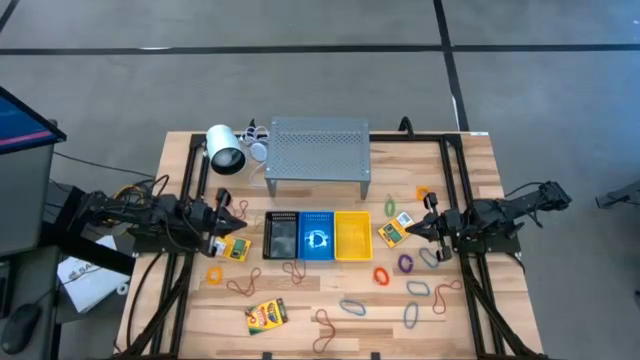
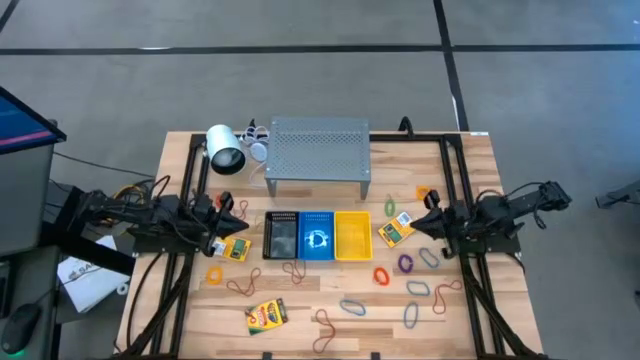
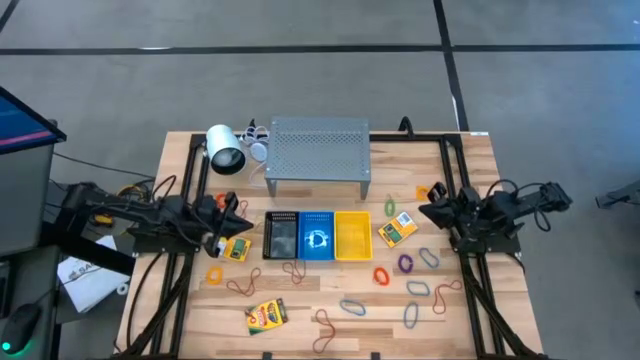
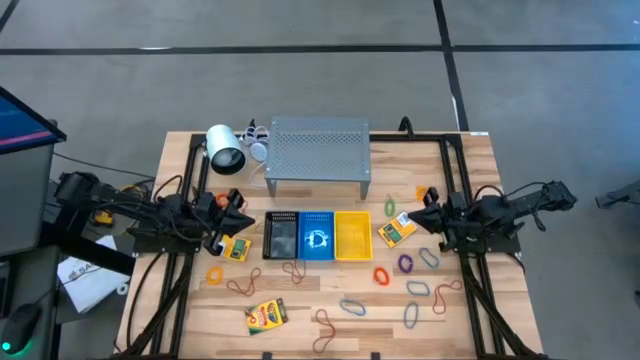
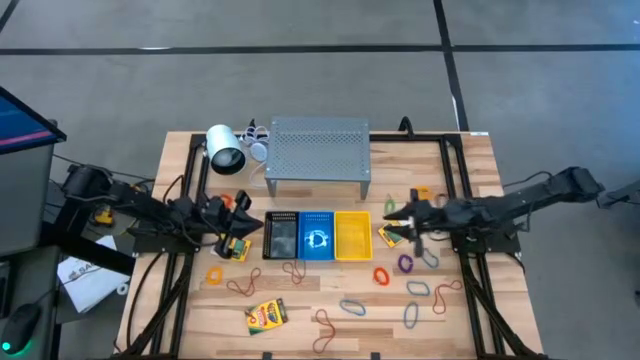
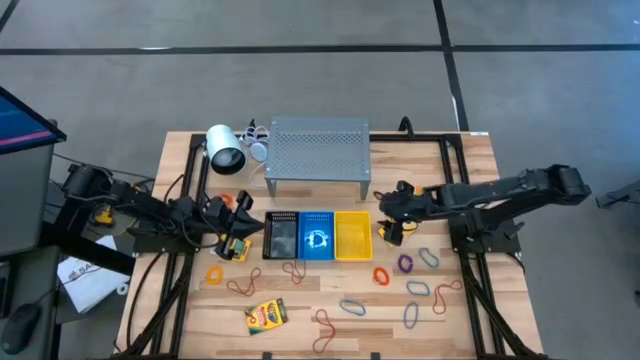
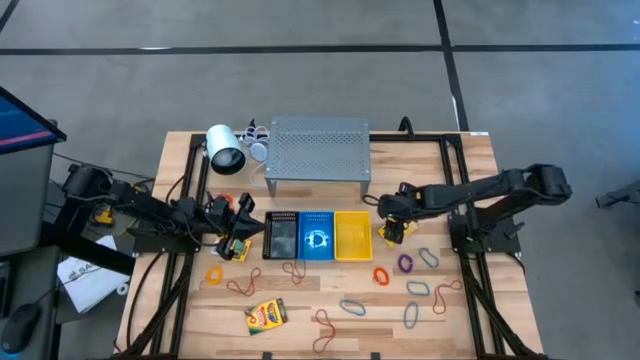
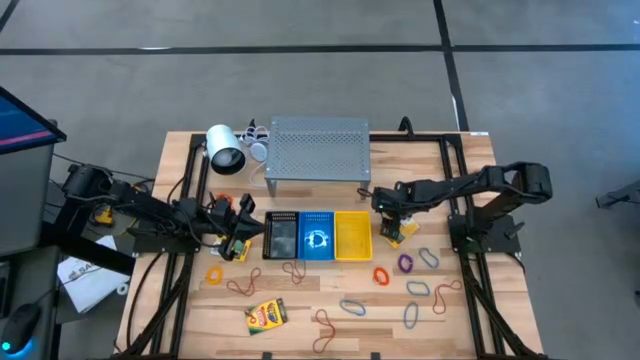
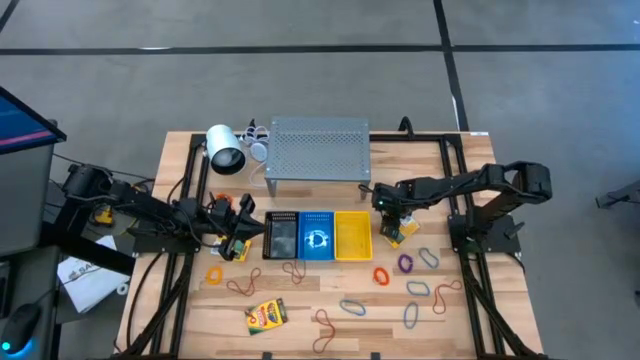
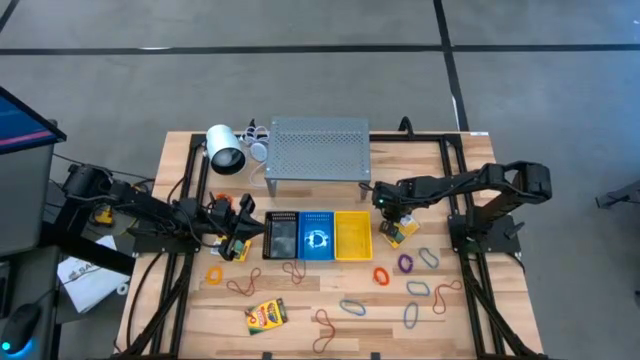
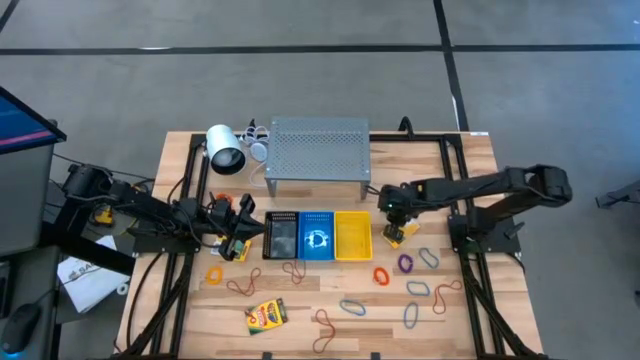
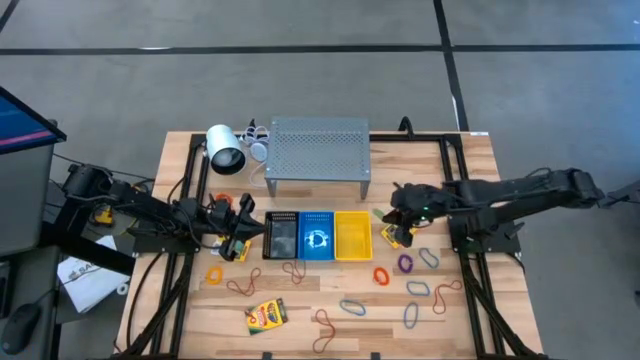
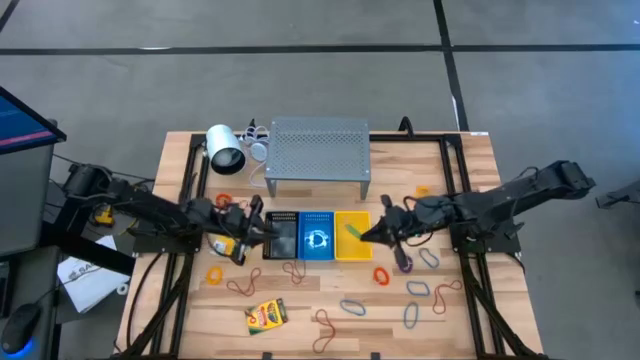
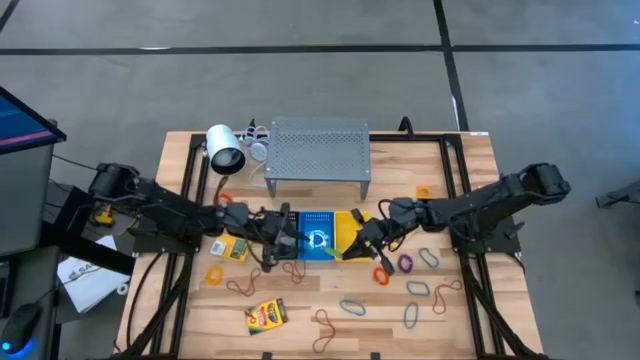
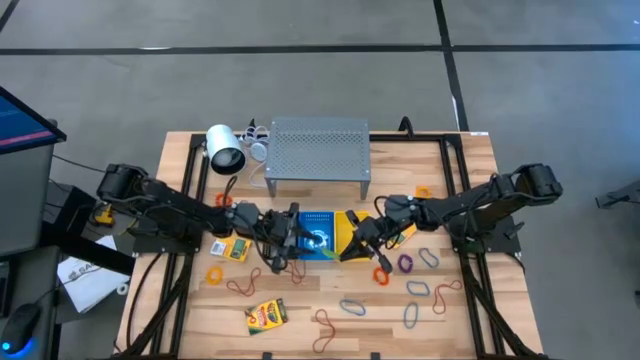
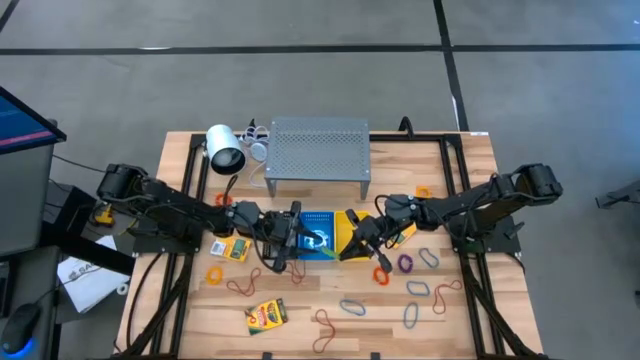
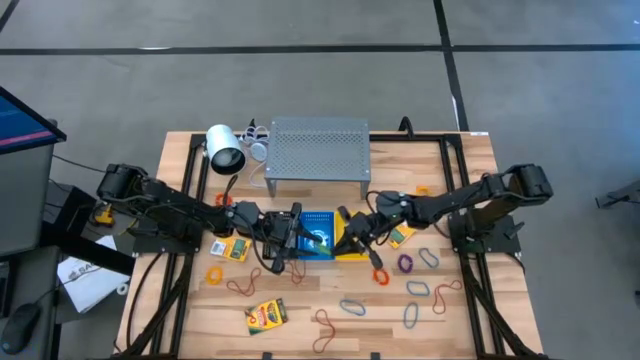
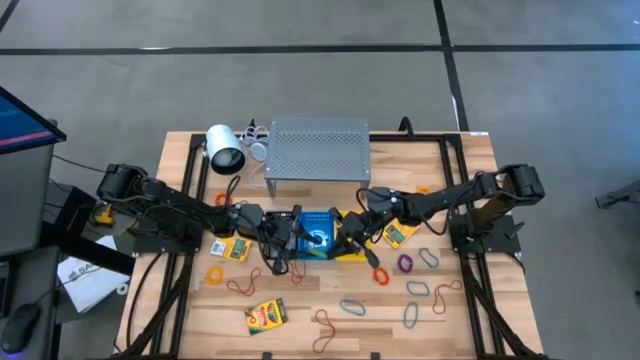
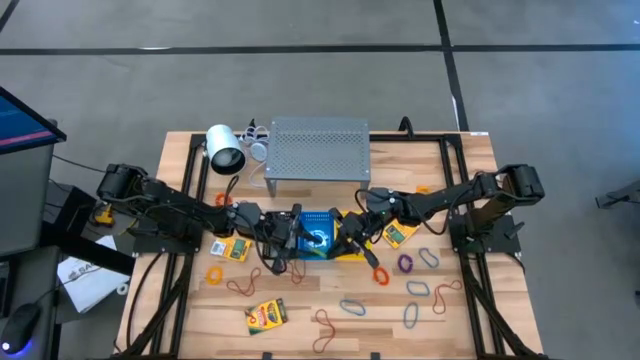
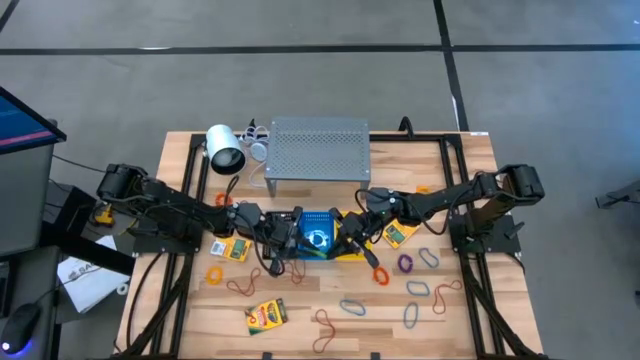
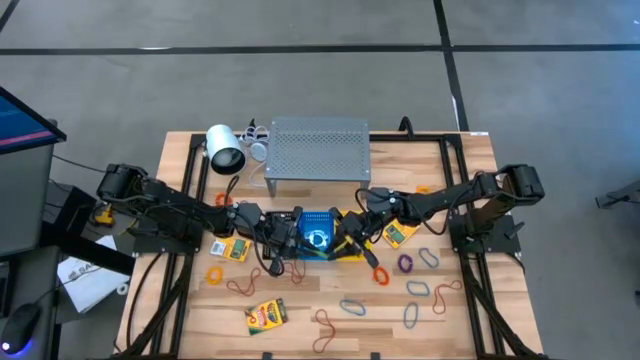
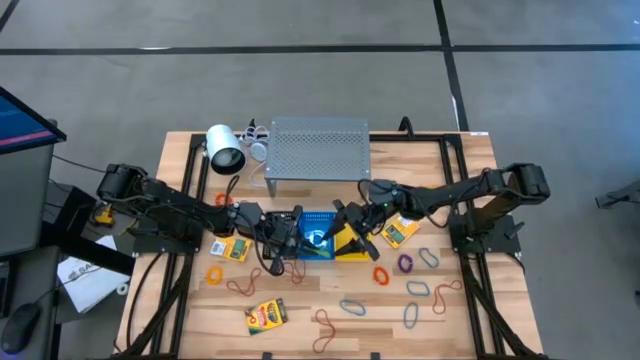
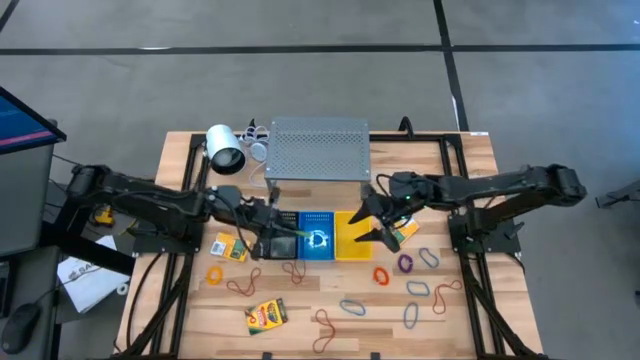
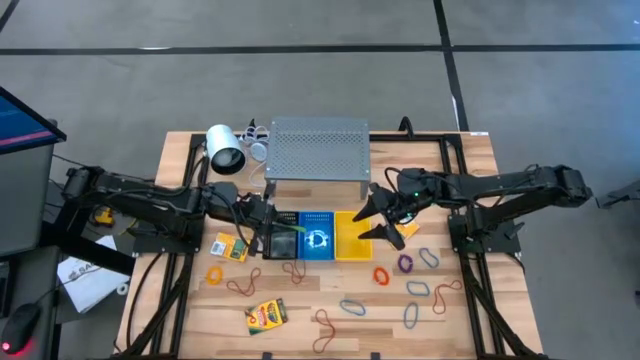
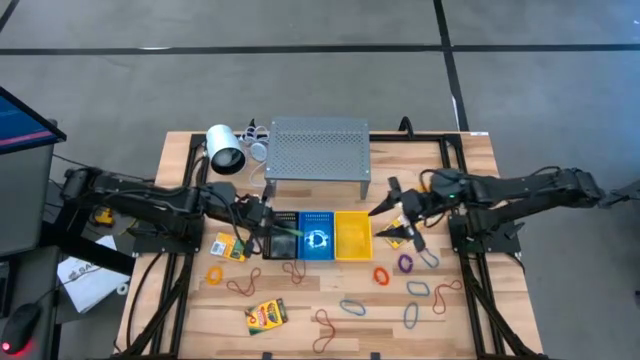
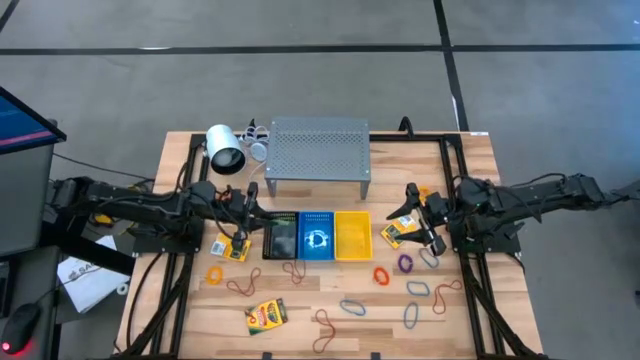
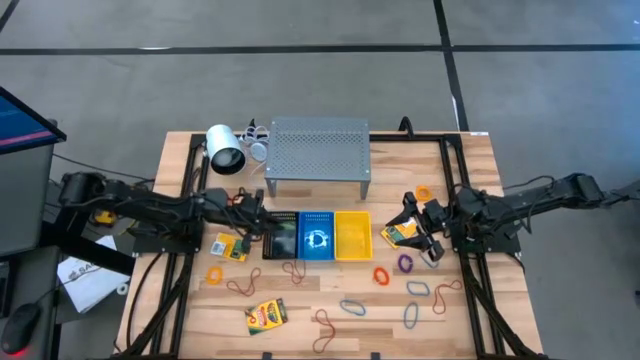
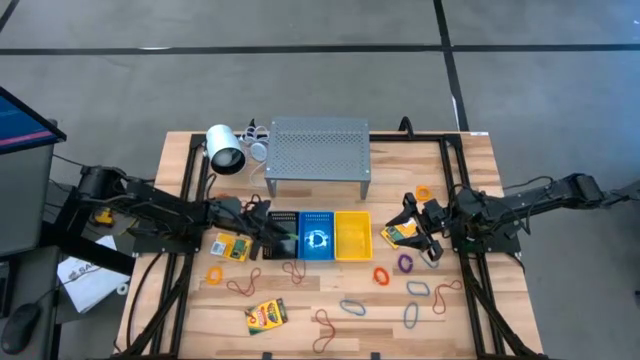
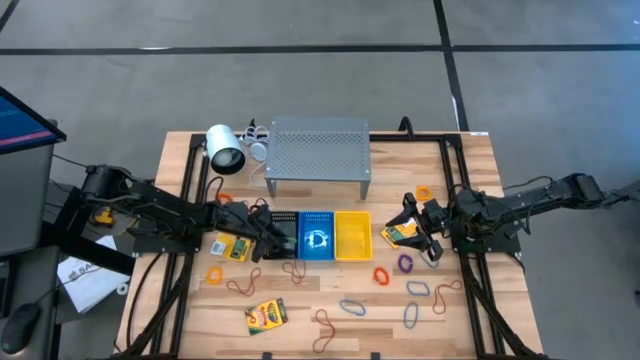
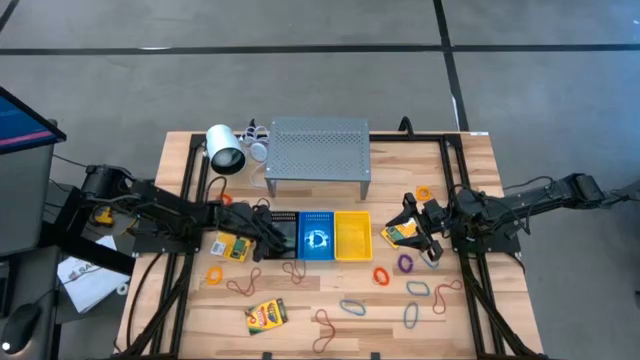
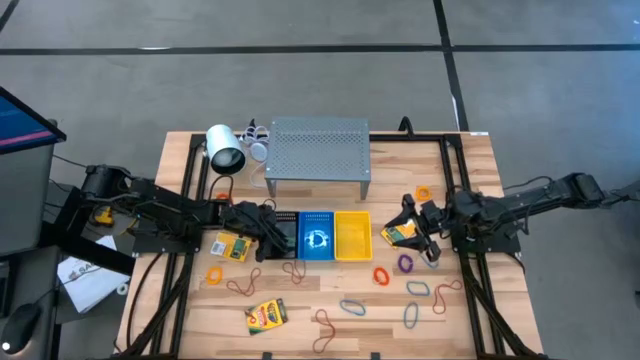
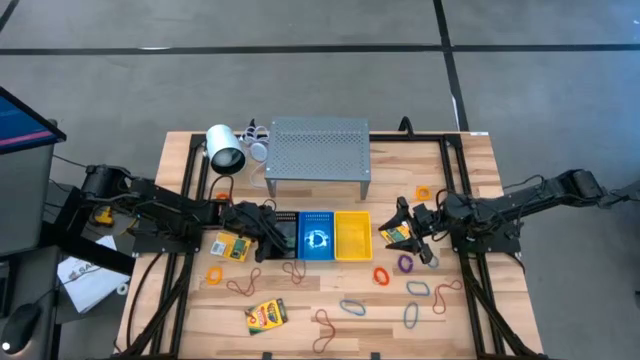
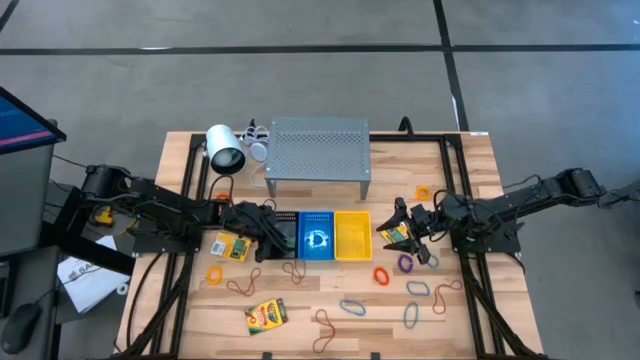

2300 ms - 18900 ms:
Task: Pick & Place Office Desk Supplies
Put the green spring keychain into the black basket

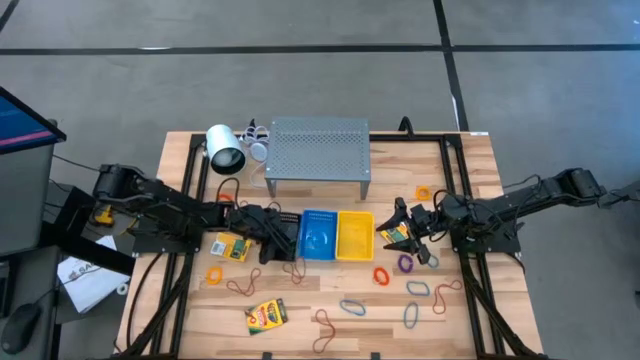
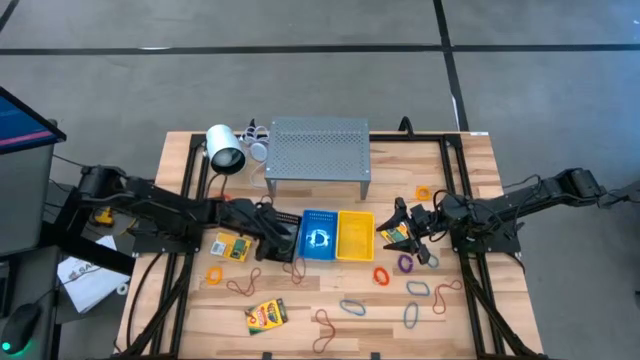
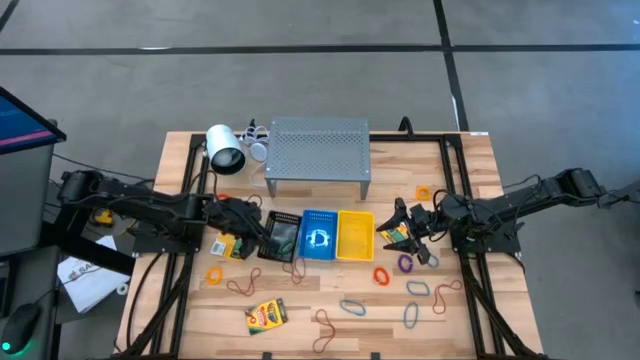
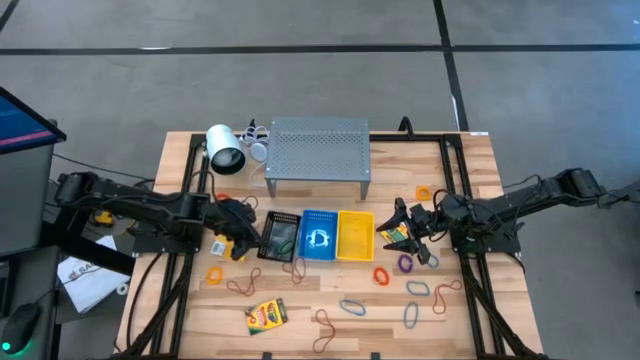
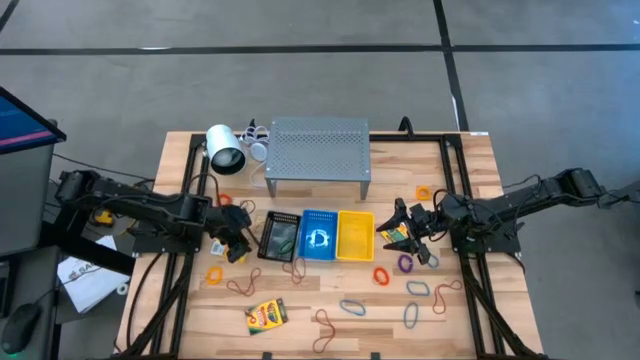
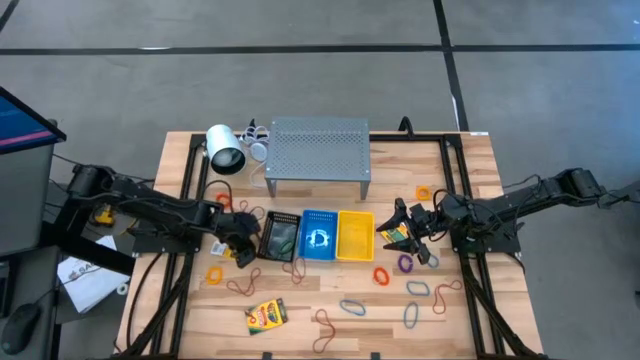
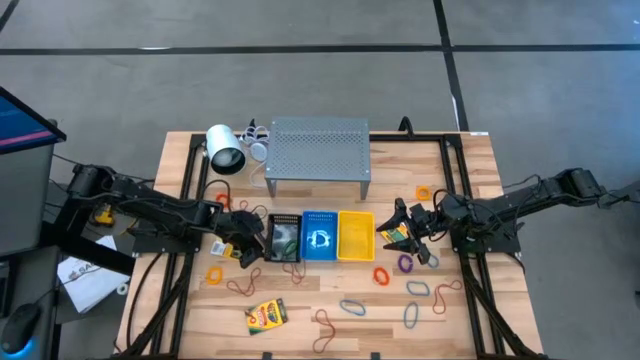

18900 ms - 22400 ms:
Adjust the black basket

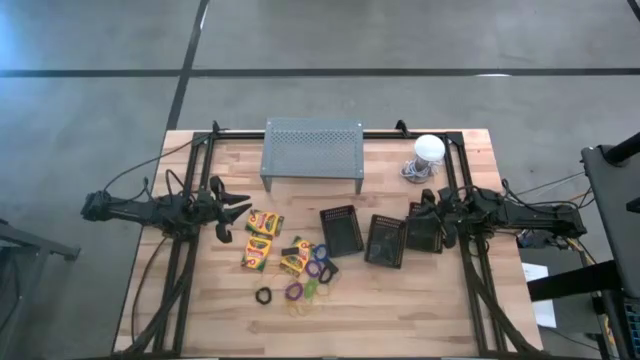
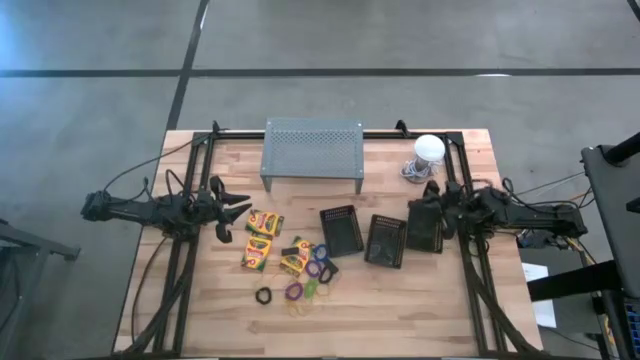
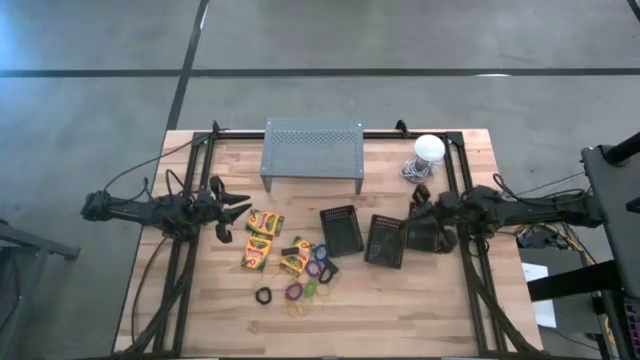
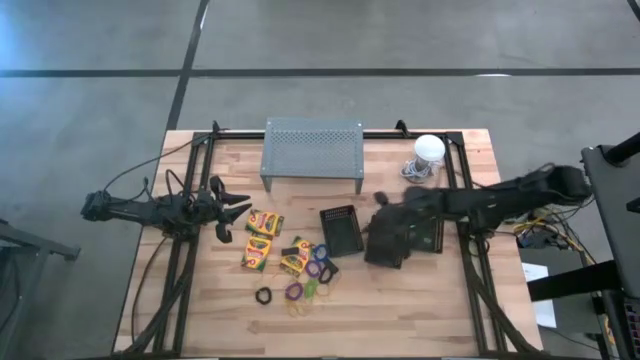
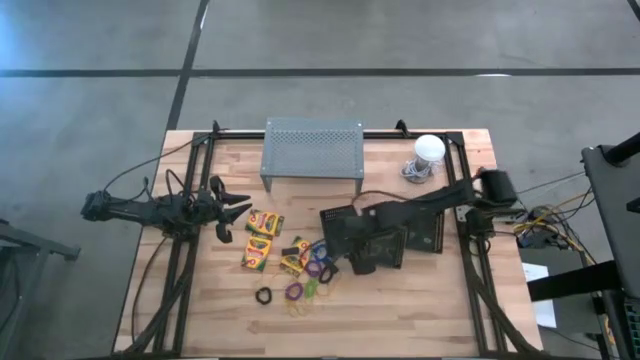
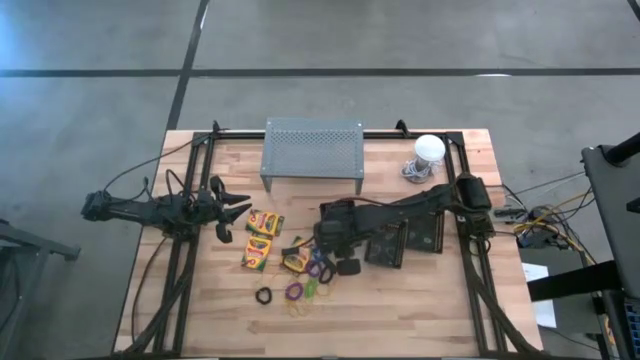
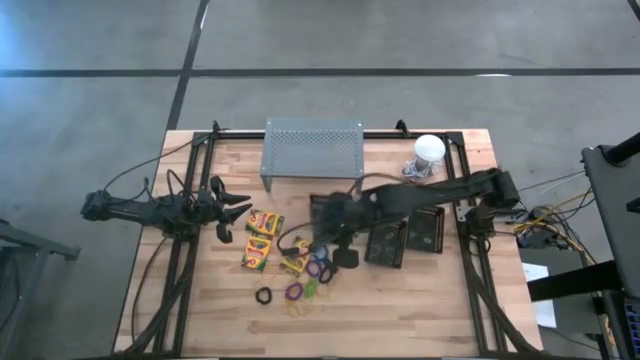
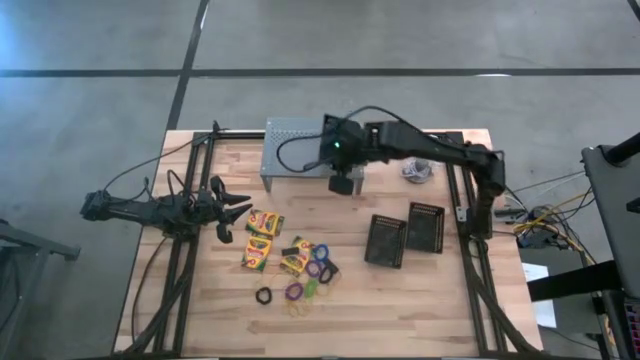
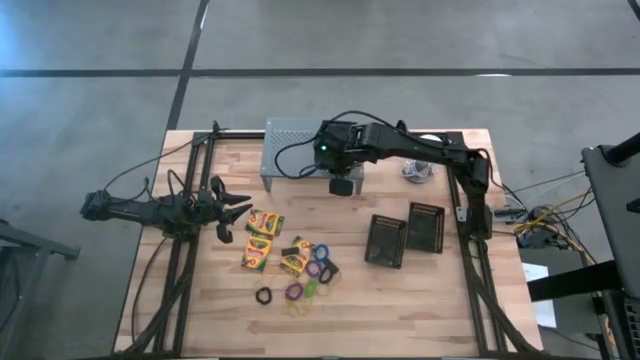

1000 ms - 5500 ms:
Task: Pick & Place Office Desk Supplies
Put the left black bin on the shelf
